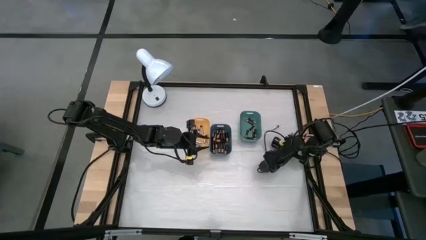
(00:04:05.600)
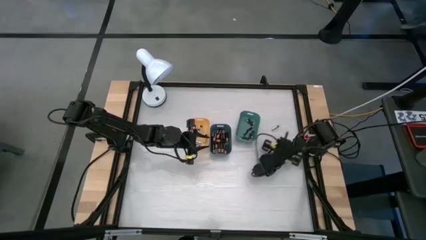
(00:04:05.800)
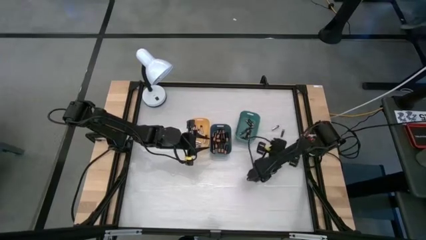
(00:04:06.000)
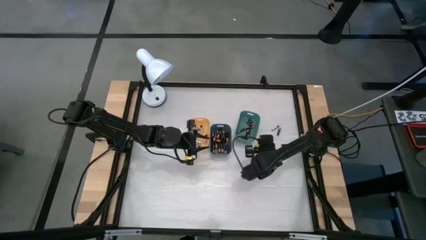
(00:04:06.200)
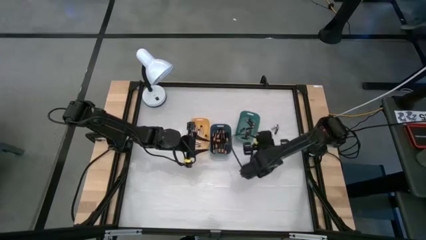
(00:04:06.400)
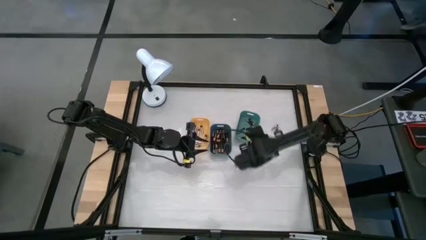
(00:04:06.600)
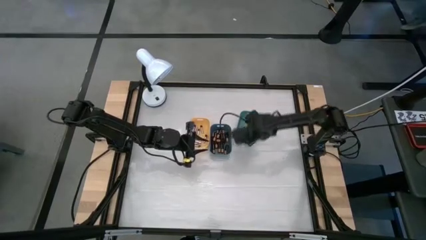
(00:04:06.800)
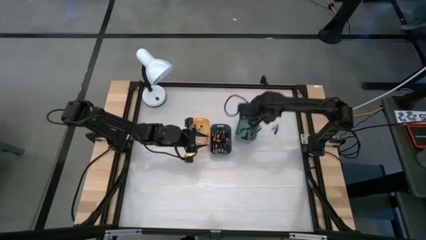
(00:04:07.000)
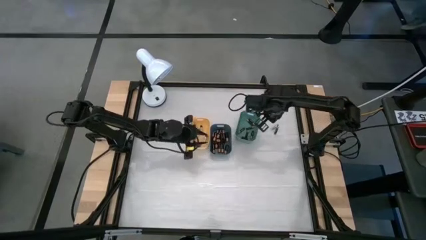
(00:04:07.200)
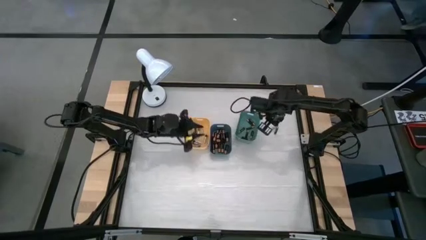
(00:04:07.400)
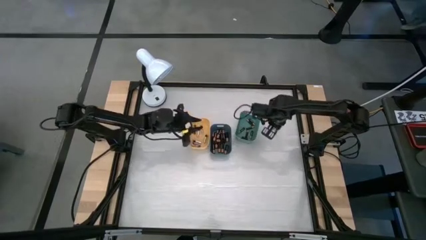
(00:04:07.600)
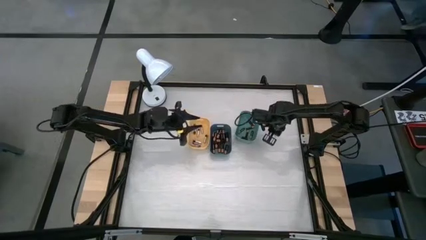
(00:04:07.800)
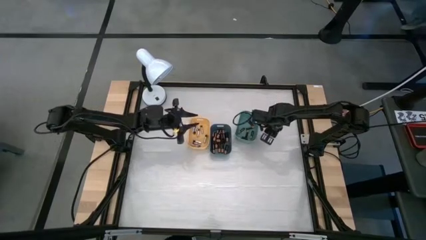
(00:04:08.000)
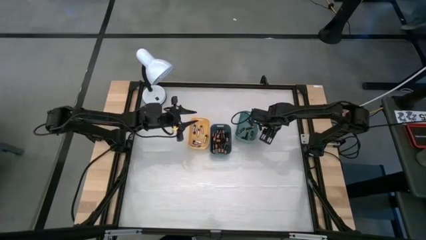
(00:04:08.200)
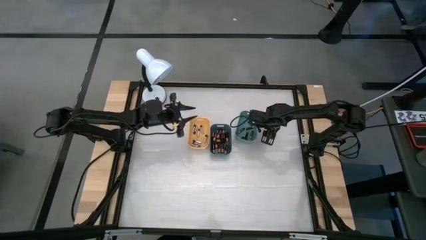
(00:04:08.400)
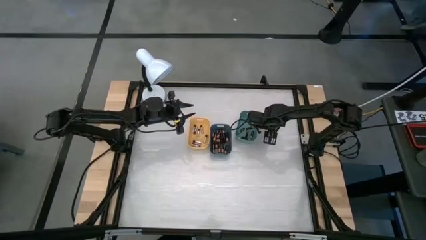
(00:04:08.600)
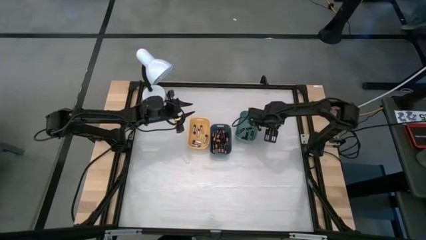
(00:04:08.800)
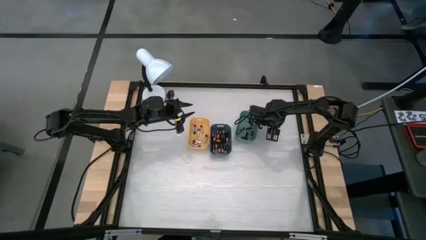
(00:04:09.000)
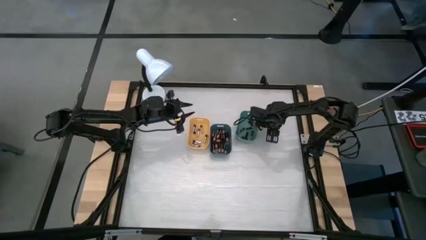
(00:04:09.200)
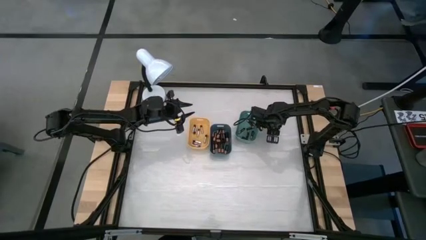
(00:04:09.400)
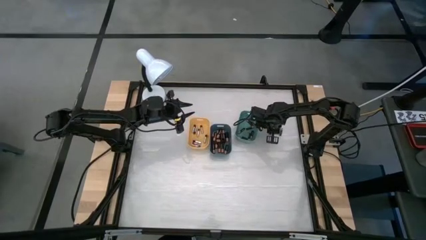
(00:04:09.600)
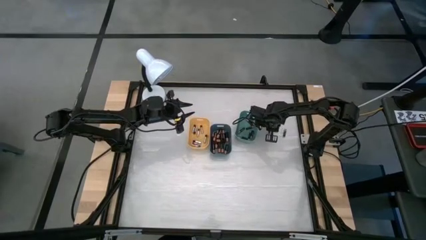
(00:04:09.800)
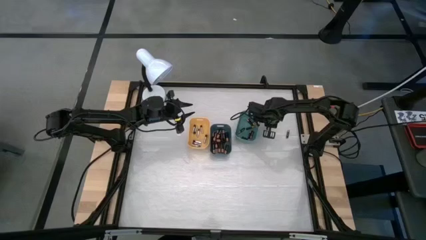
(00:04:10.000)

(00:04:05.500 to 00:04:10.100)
Task: Sort batteries
Put the silver battery into the yellow bin

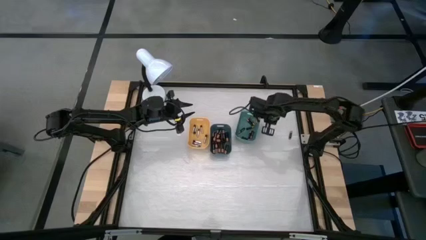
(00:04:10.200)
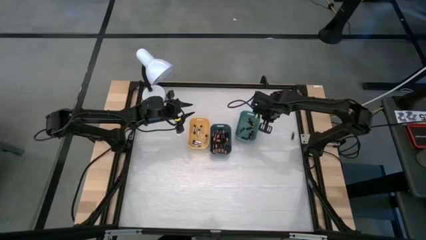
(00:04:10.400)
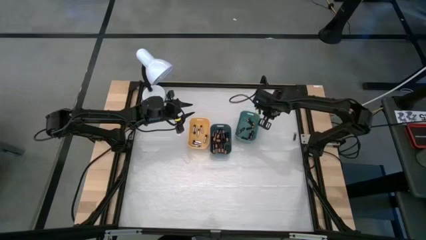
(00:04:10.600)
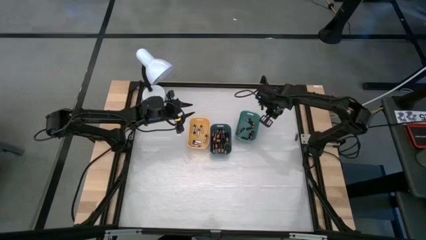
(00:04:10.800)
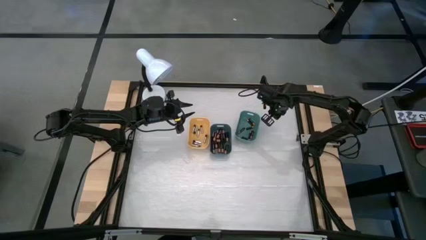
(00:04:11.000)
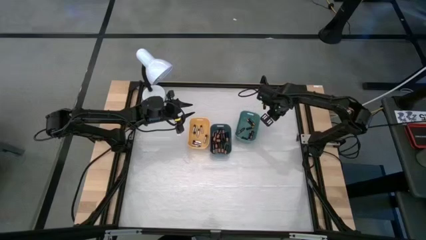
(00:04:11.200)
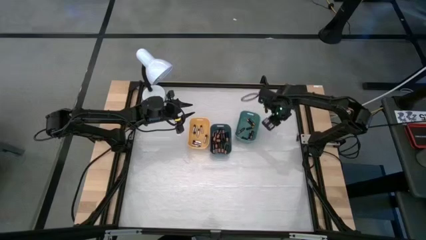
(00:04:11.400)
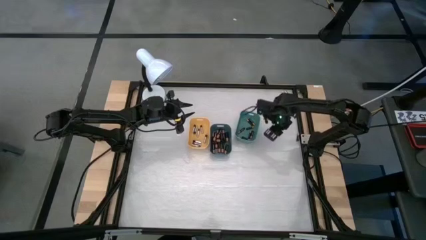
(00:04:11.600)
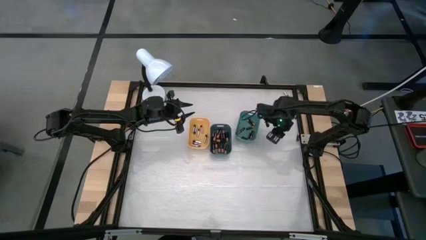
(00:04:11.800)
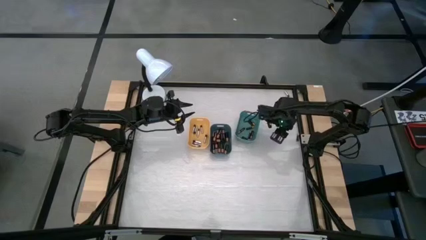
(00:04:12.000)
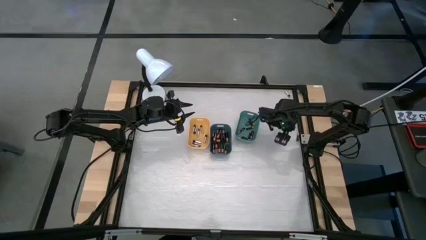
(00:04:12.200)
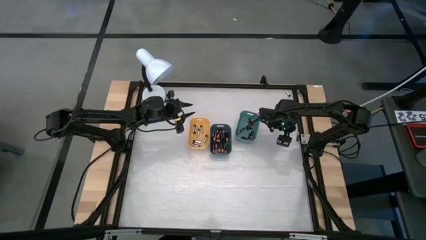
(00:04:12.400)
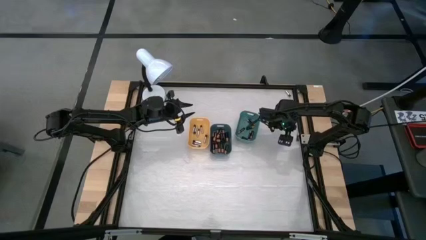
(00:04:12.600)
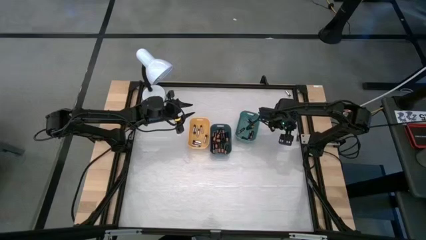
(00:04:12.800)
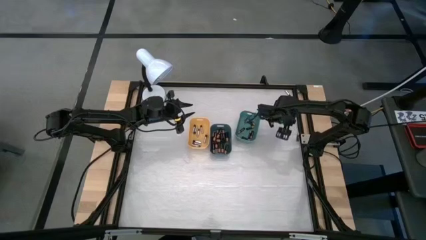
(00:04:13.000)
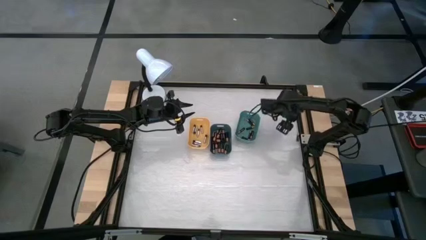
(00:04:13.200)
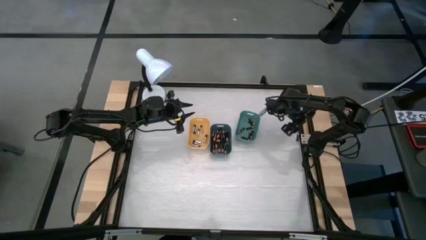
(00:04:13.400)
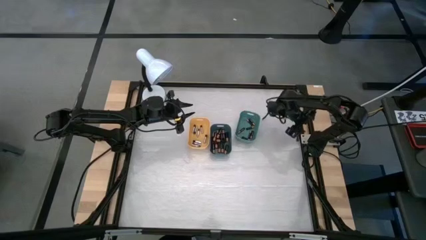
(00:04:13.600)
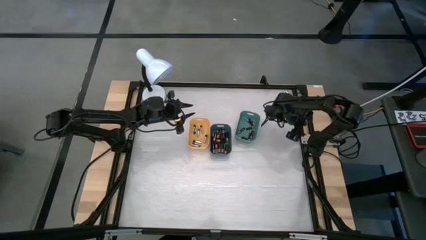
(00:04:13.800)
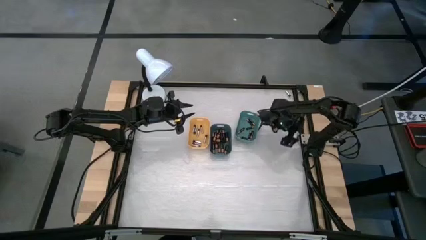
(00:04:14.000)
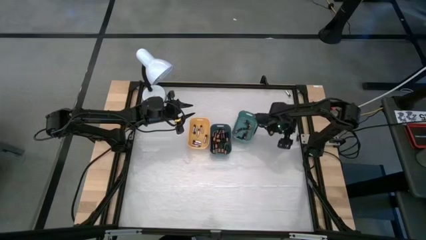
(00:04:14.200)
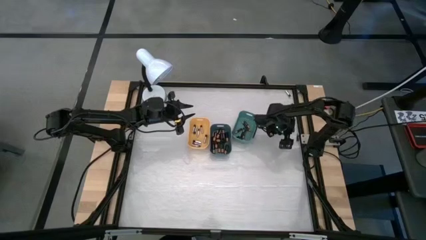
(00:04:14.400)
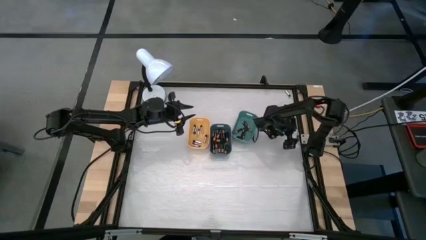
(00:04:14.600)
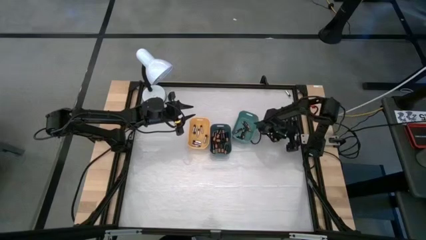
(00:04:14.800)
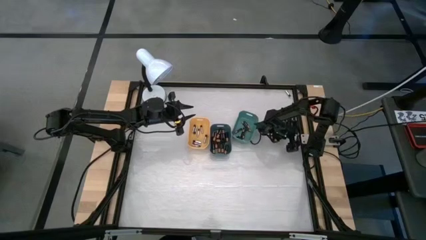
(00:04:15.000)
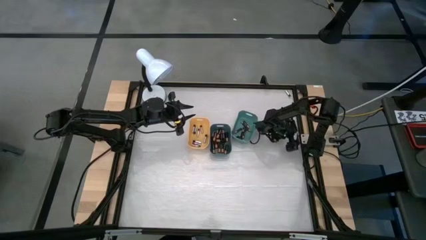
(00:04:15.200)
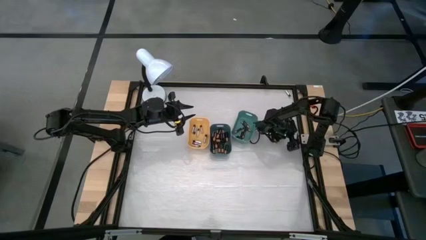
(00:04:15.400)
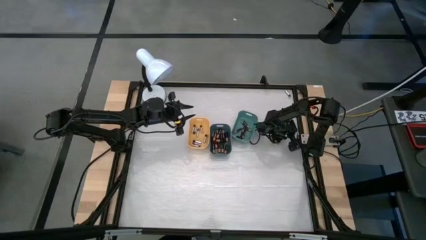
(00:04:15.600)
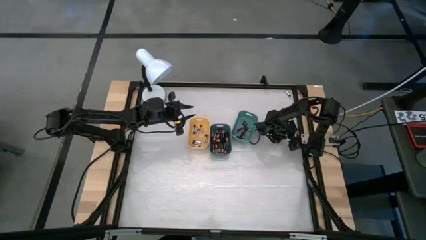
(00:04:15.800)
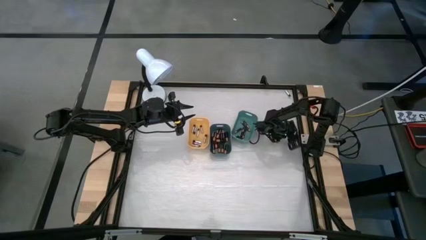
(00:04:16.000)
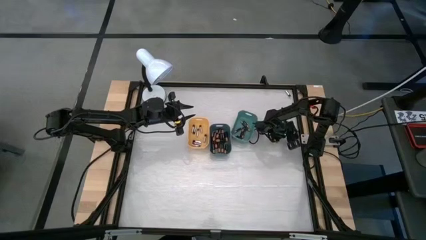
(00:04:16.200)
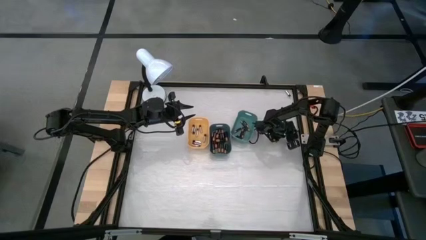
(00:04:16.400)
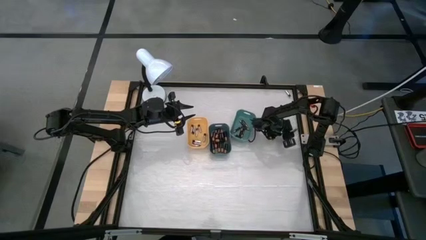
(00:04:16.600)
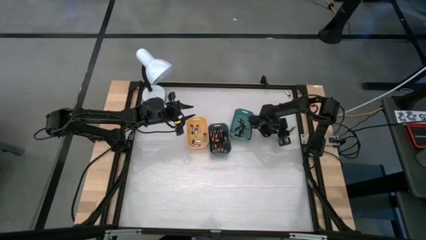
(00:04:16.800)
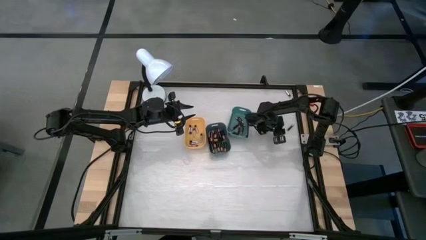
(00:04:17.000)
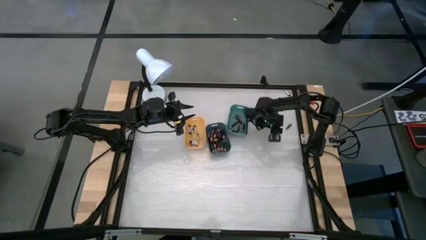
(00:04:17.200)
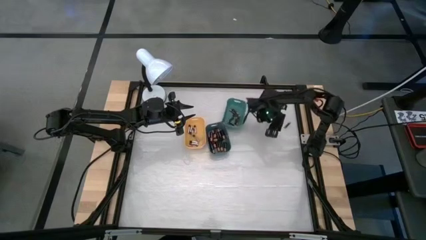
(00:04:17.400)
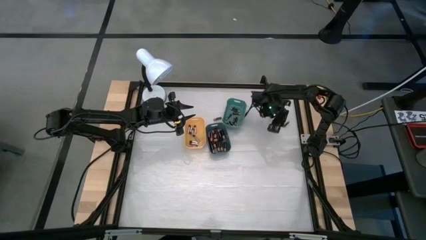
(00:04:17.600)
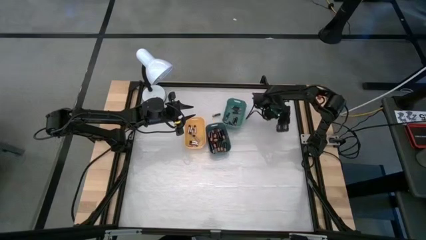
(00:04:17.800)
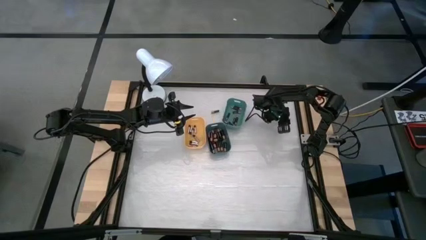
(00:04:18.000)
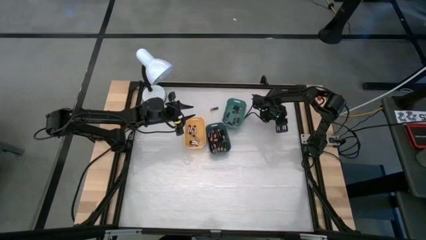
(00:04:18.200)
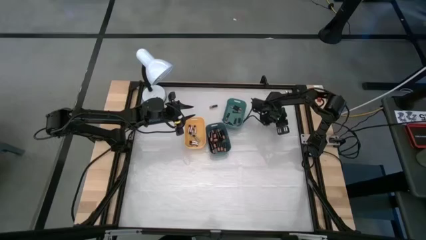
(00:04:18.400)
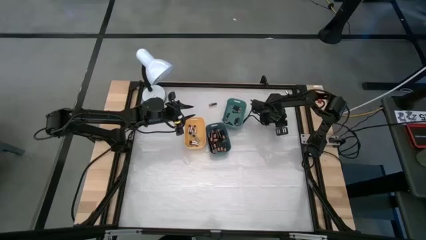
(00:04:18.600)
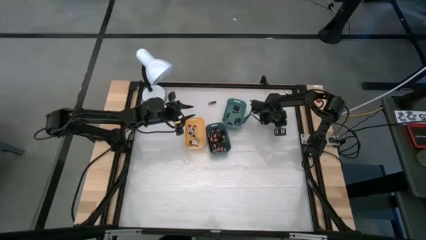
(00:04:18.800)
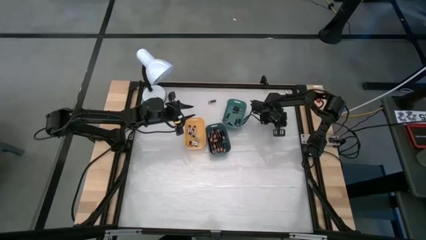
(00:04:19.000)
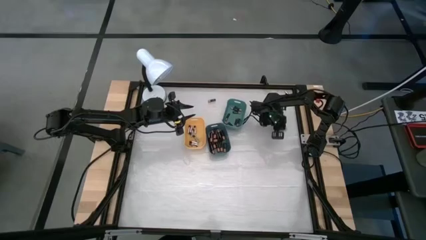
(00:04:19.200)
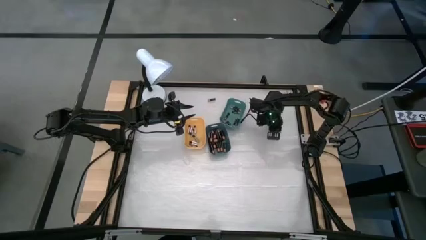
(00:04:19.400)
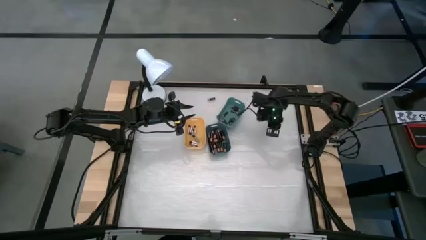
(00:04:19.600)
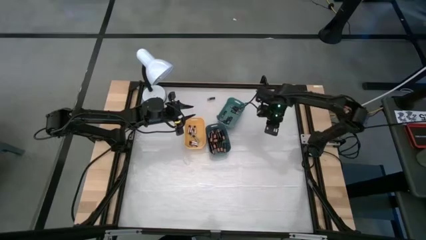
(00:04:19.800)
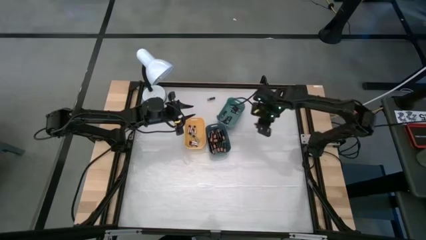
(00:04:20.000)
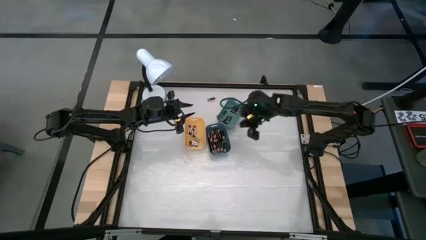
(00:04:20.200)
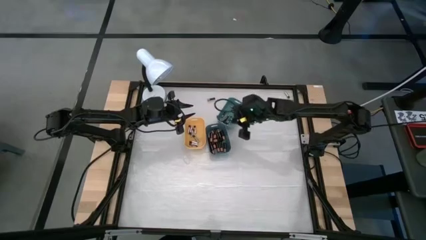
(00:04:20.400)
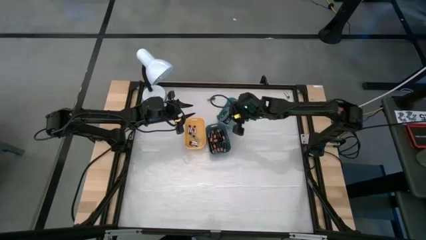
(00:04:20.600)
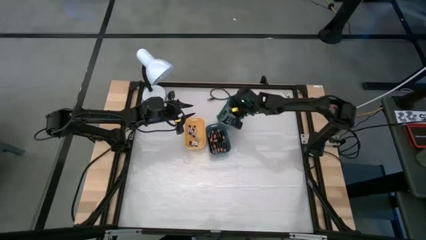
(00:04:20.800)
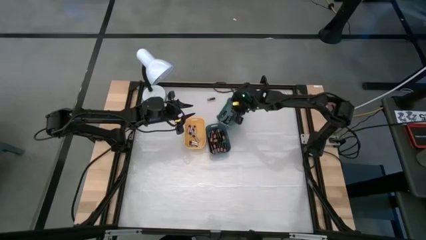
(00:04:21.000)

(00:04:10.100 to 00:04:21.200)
Put the black battery into the green bin
